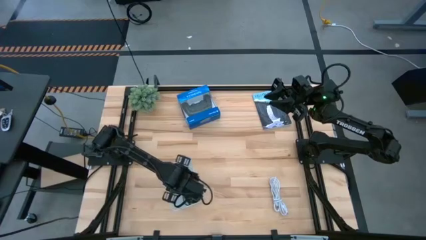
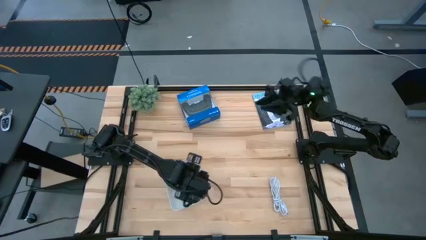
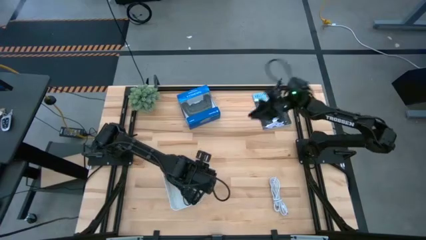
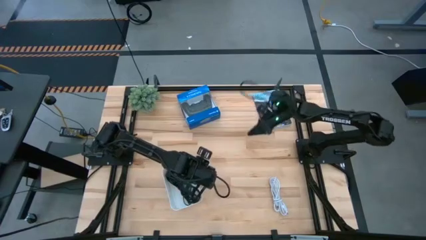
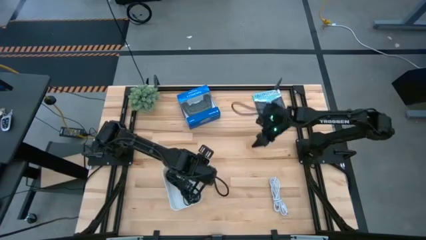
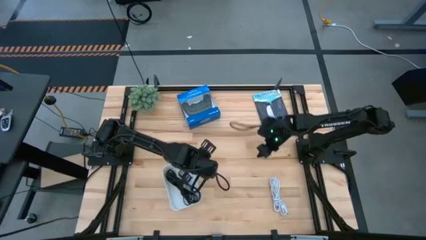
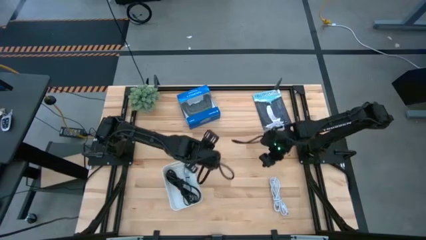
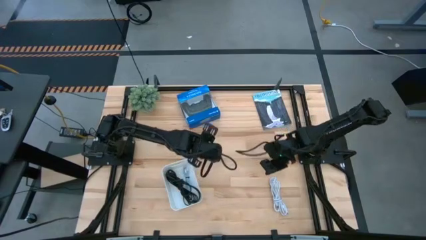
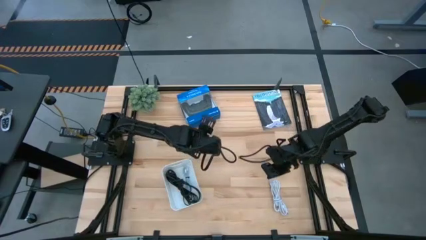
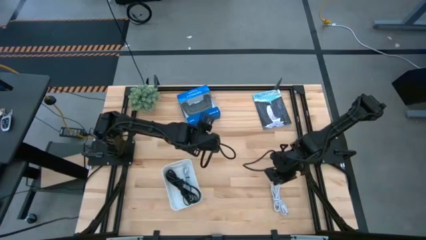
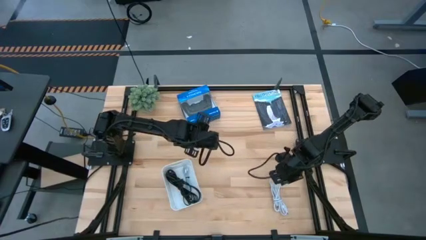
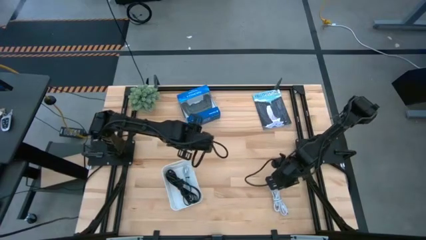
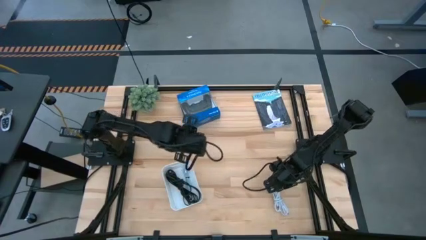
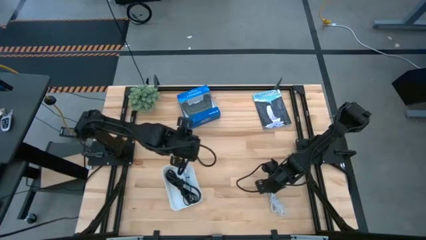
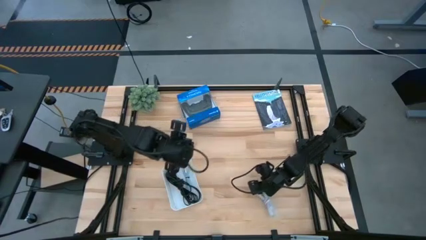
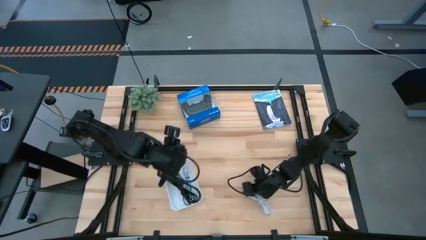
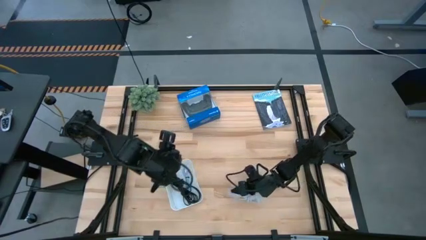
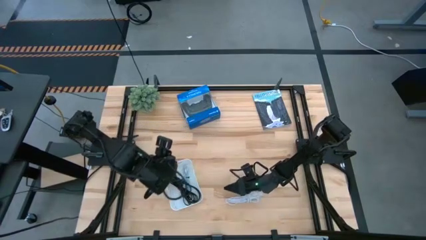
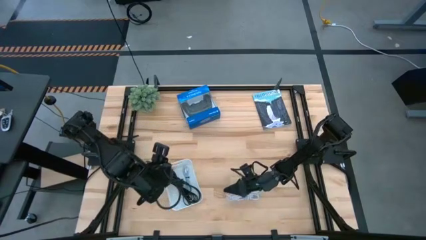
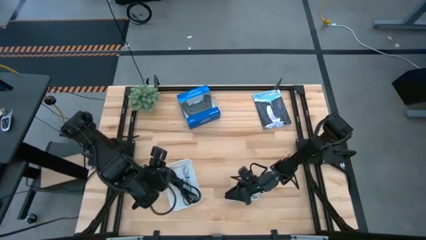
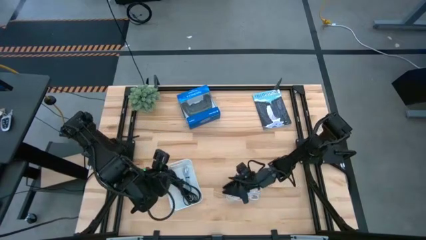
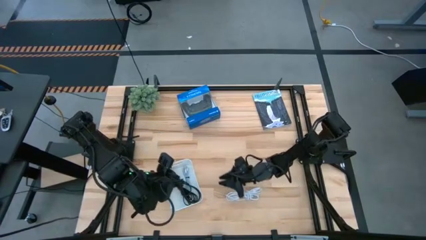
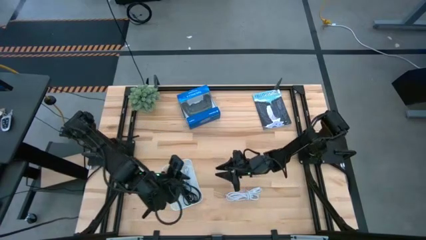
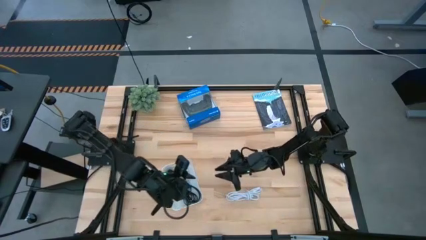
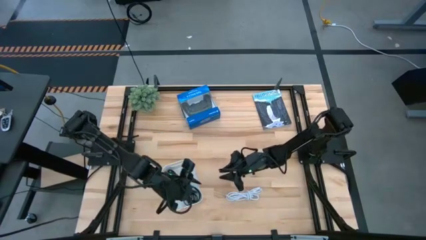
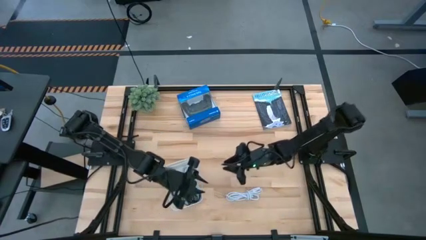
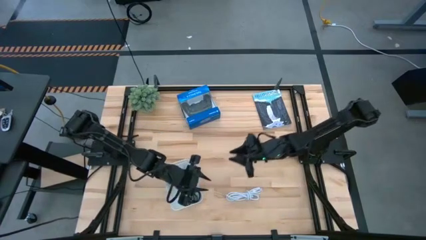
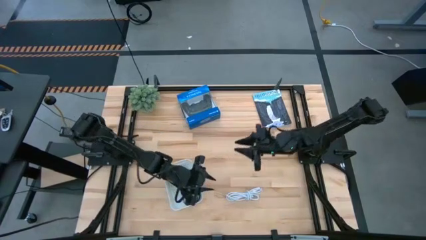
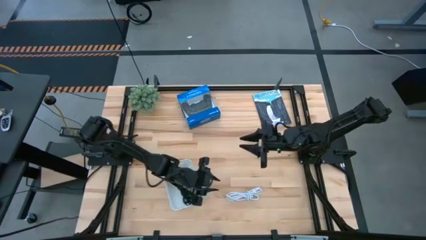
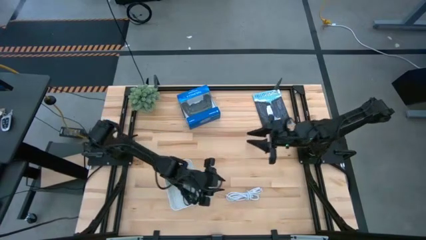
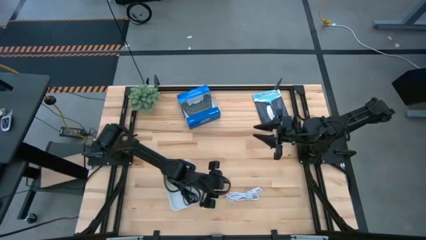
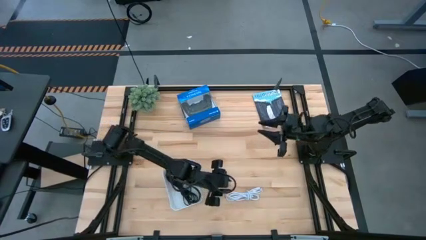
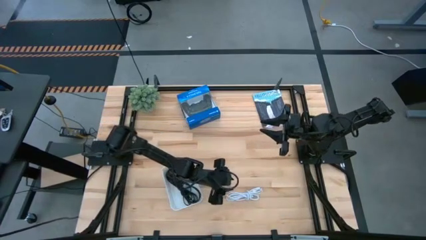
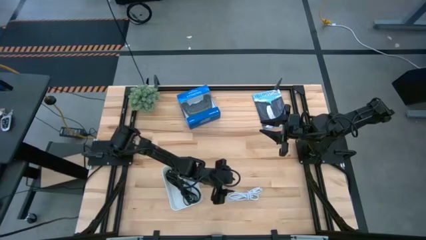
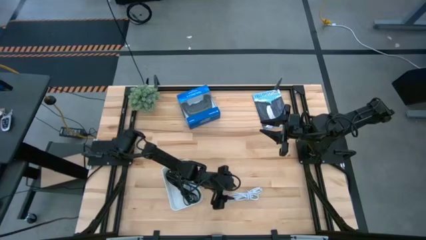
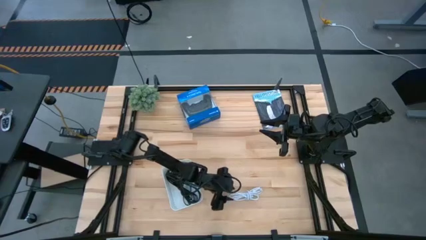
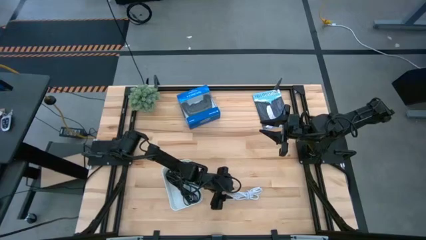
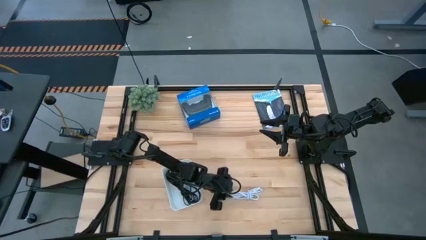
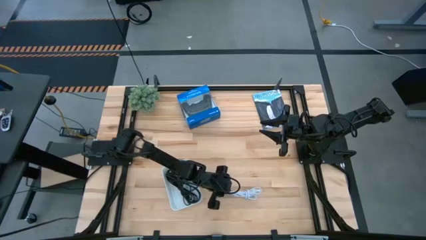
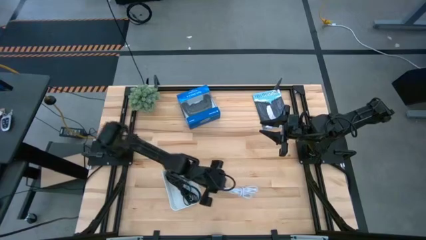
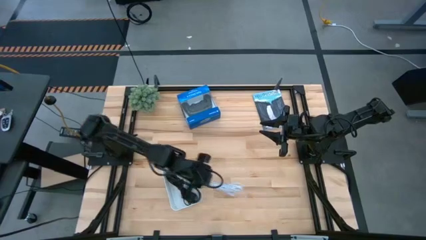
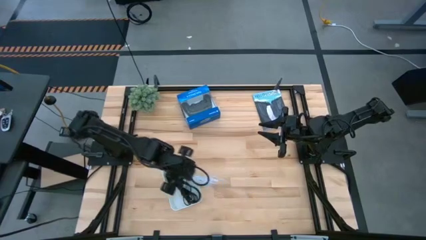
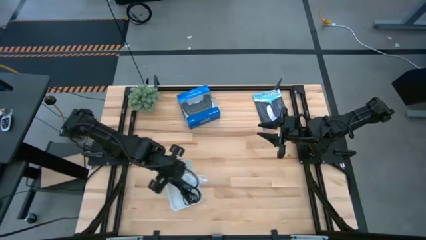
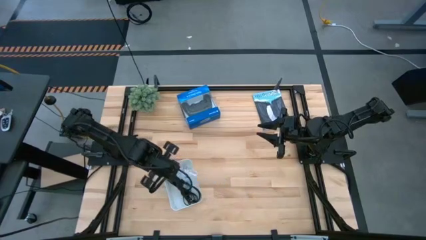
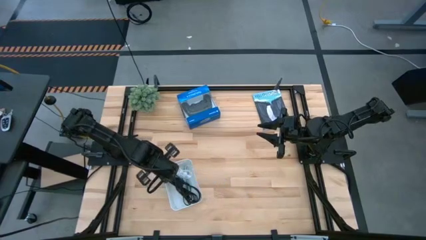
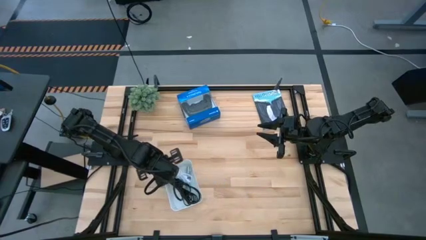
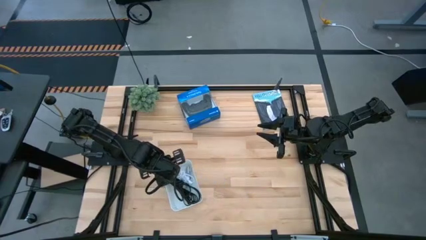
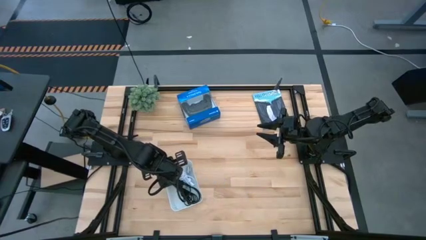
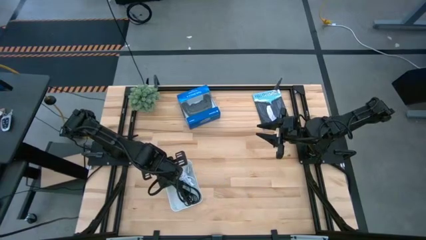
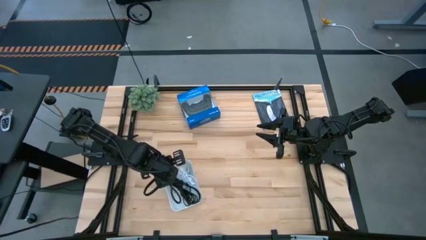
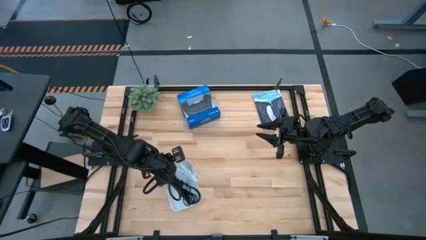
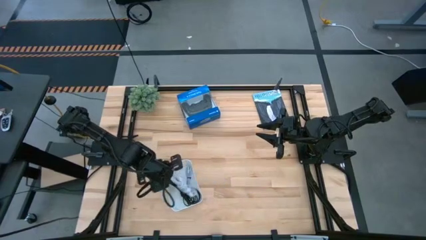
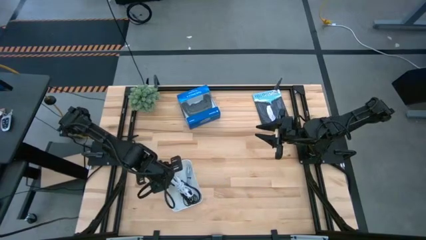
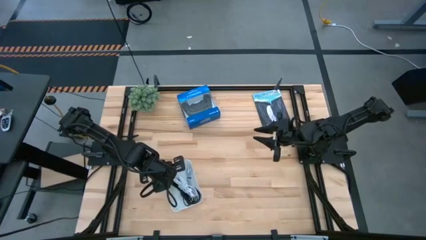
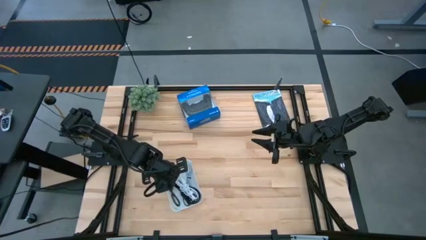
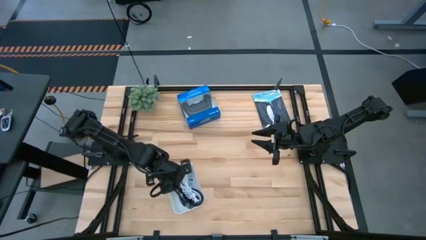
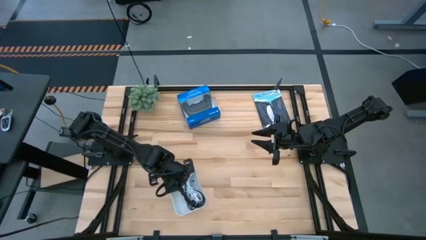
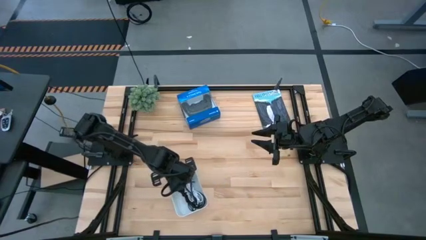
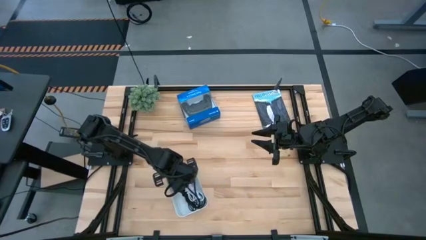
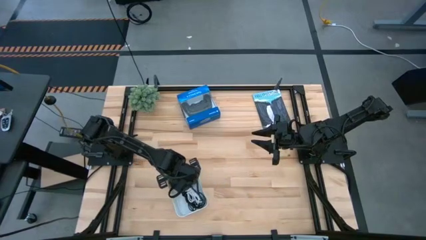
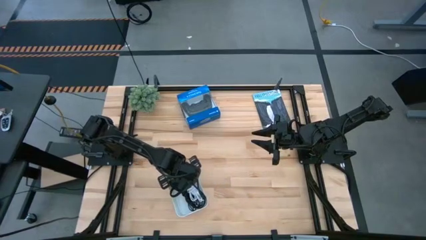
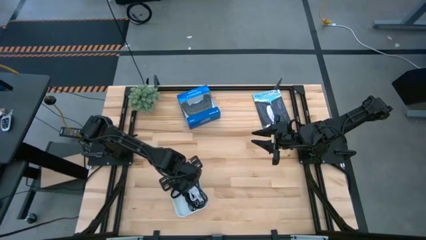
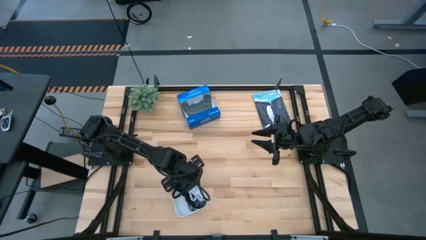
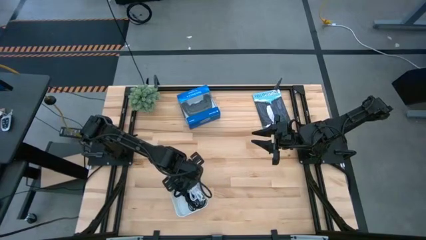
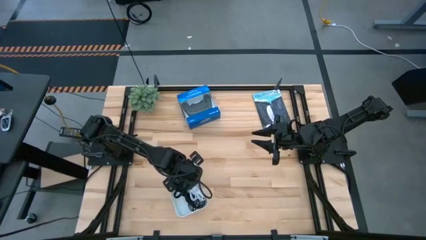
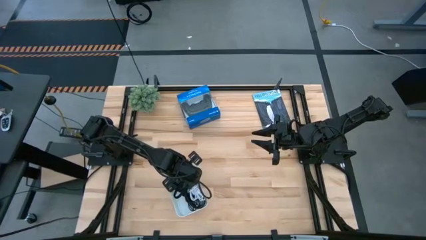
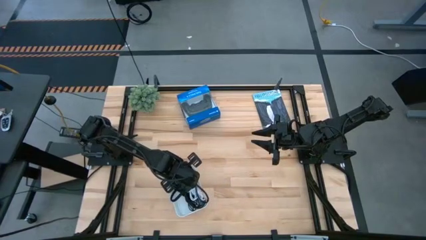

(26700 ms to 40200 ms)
Task: Pick and place USB-C Cables
Put the white charger cable into the bin
